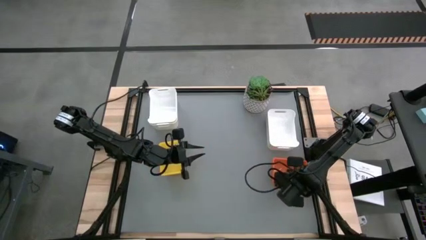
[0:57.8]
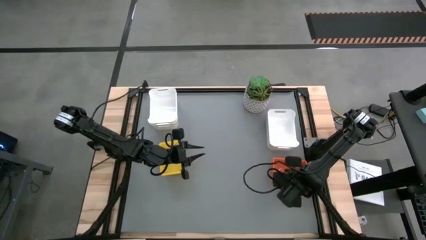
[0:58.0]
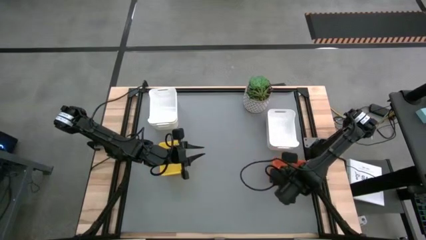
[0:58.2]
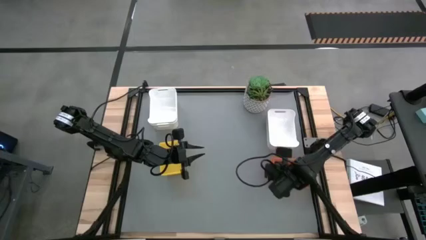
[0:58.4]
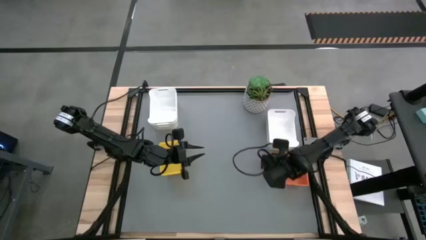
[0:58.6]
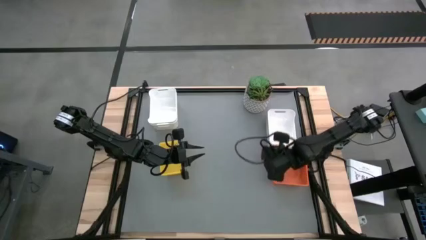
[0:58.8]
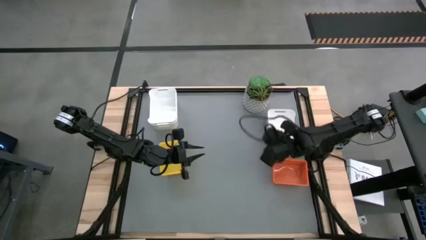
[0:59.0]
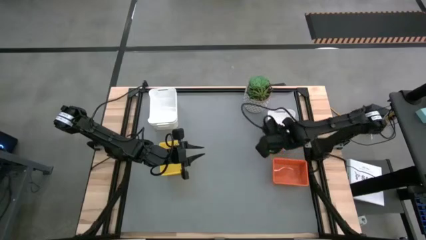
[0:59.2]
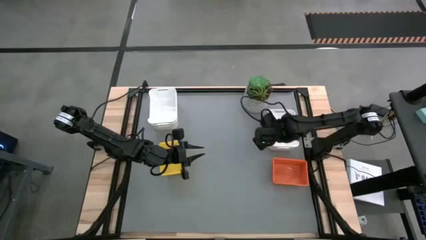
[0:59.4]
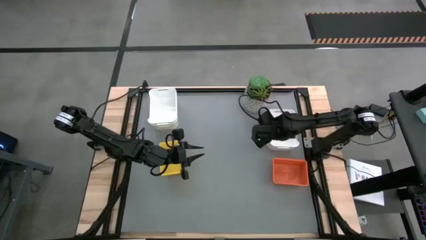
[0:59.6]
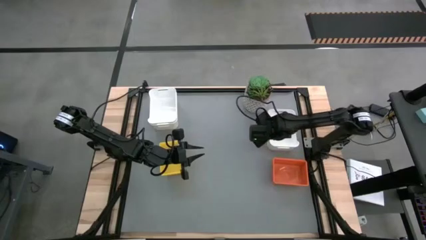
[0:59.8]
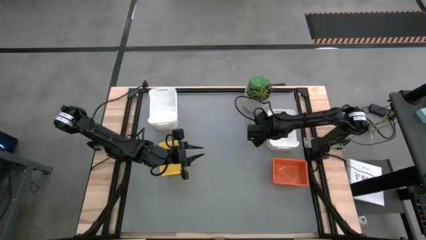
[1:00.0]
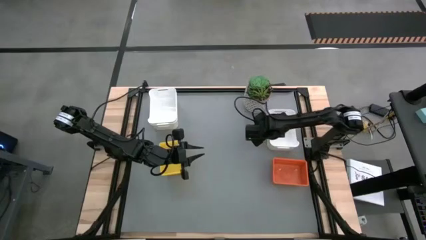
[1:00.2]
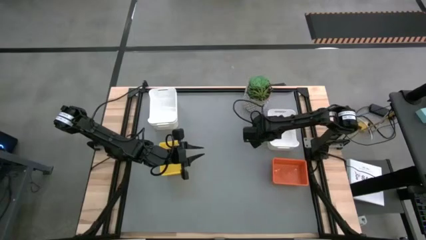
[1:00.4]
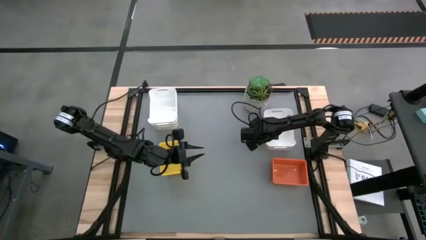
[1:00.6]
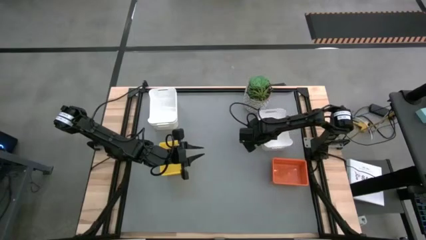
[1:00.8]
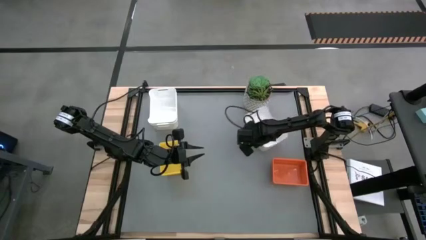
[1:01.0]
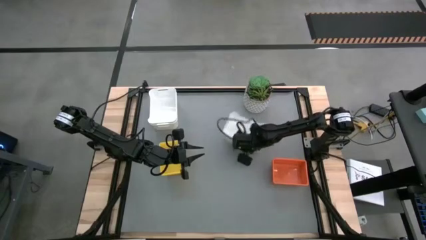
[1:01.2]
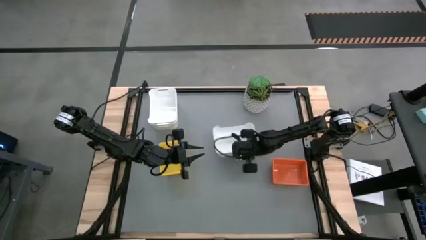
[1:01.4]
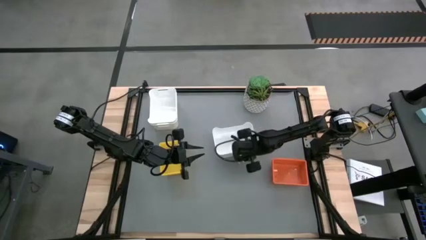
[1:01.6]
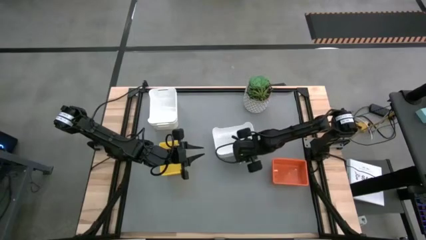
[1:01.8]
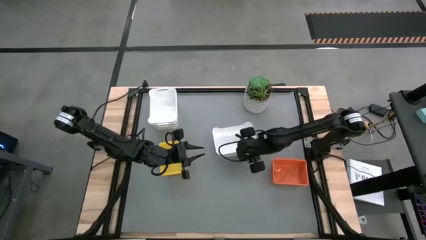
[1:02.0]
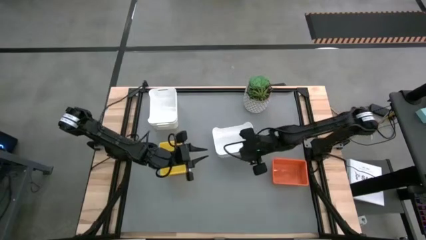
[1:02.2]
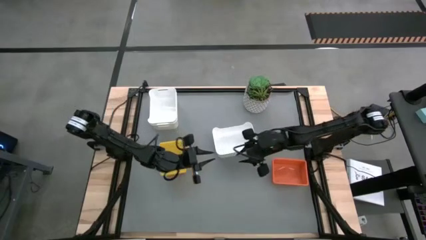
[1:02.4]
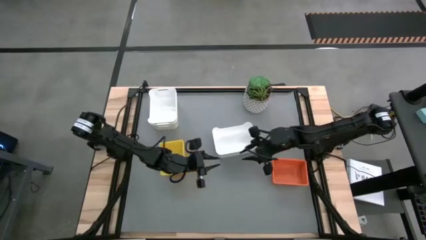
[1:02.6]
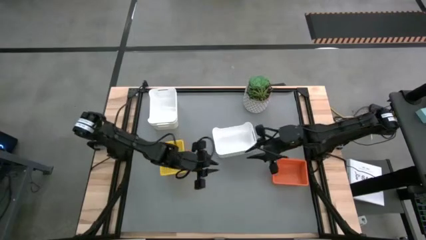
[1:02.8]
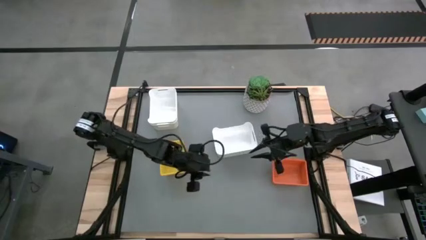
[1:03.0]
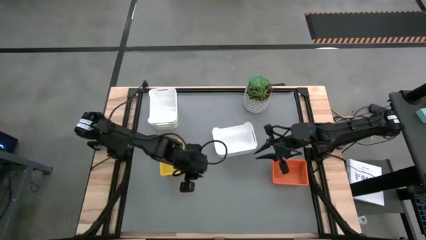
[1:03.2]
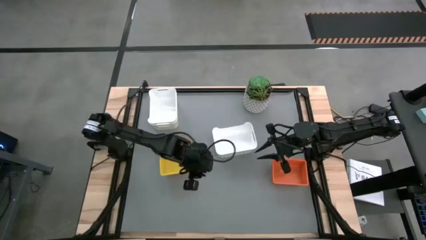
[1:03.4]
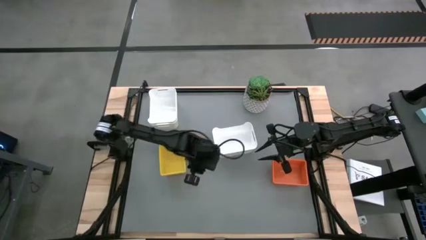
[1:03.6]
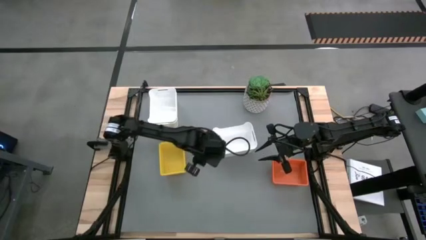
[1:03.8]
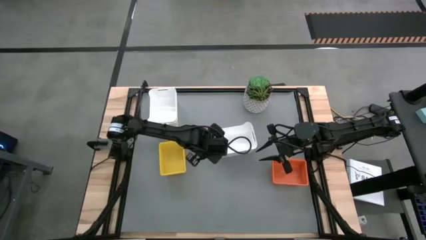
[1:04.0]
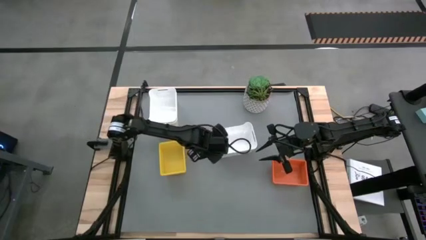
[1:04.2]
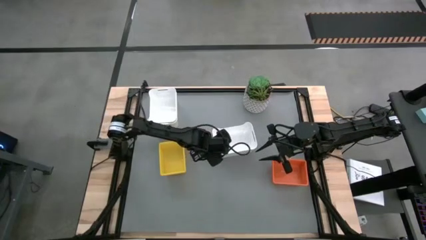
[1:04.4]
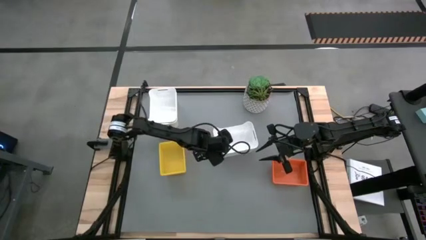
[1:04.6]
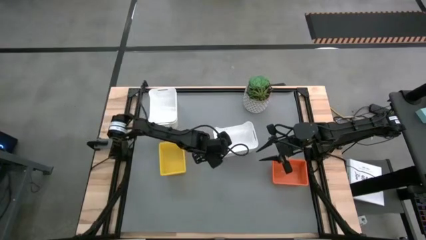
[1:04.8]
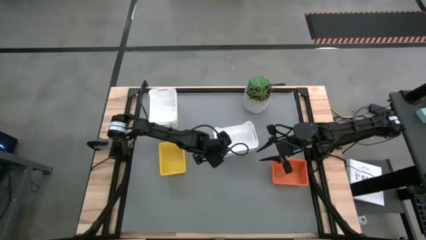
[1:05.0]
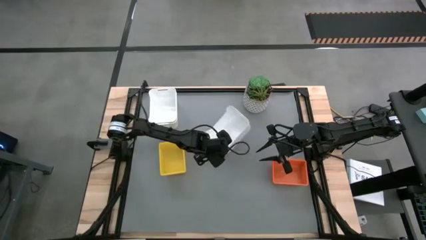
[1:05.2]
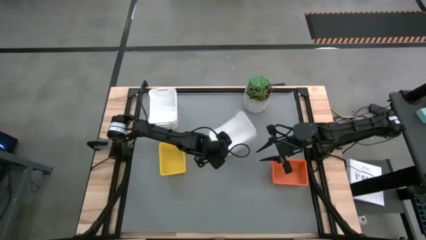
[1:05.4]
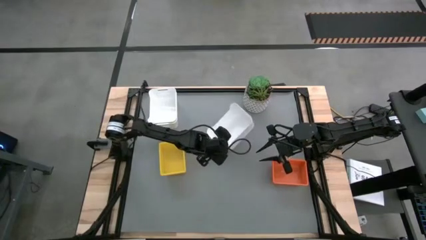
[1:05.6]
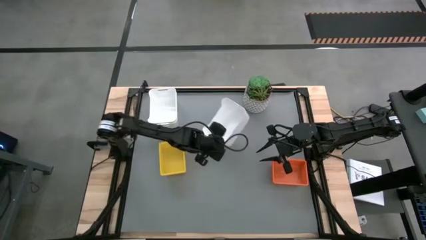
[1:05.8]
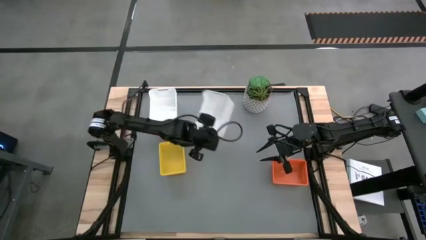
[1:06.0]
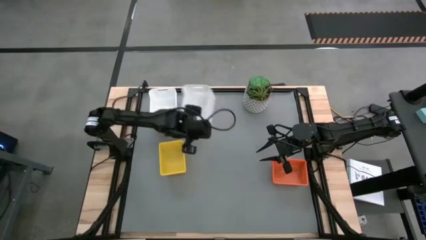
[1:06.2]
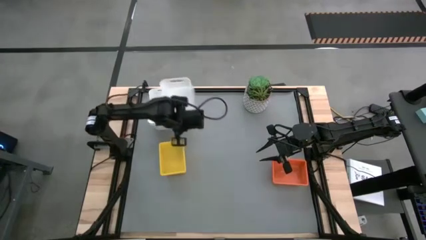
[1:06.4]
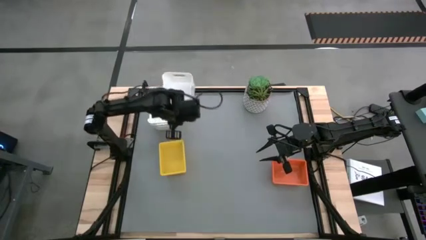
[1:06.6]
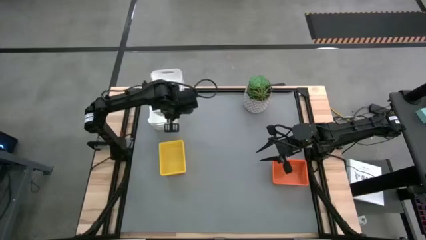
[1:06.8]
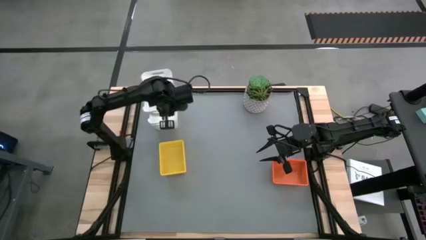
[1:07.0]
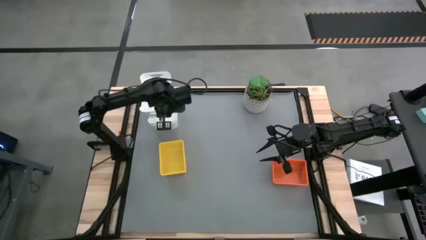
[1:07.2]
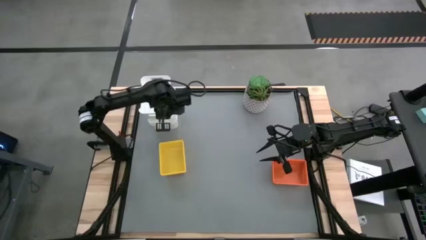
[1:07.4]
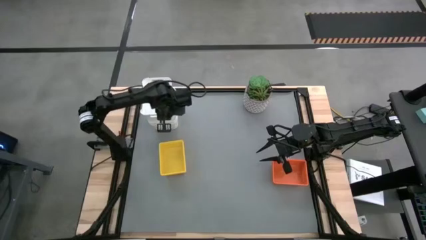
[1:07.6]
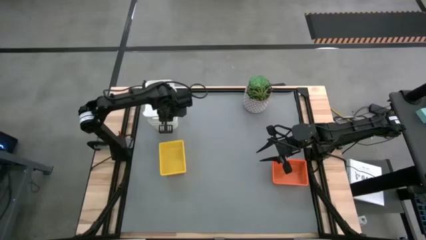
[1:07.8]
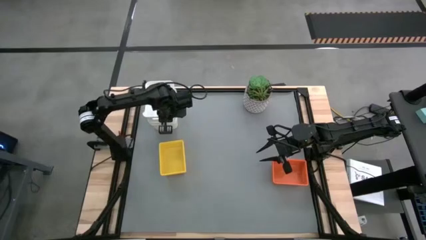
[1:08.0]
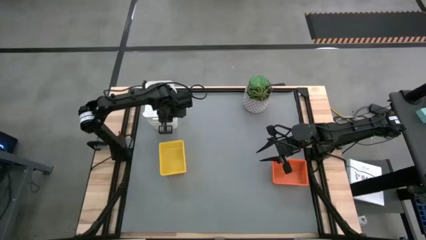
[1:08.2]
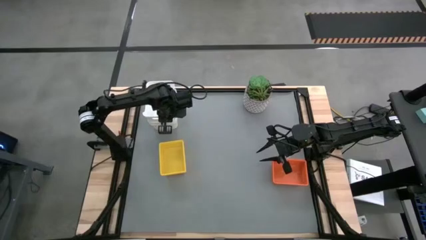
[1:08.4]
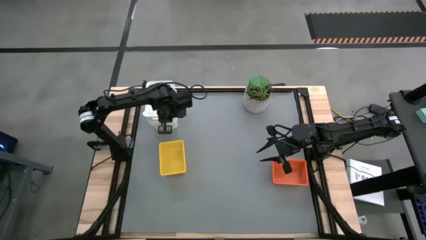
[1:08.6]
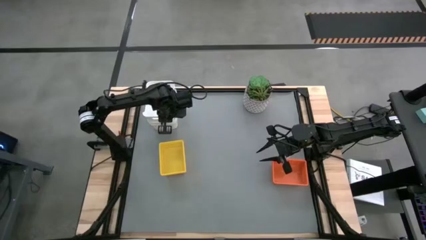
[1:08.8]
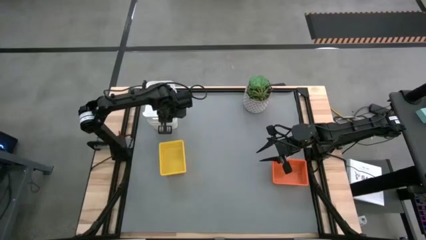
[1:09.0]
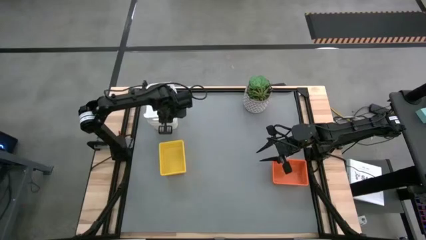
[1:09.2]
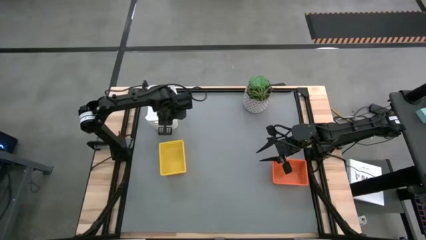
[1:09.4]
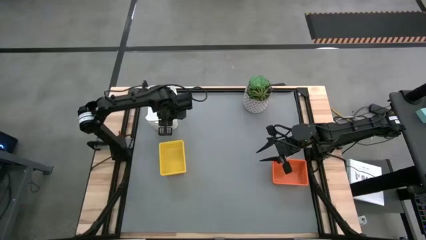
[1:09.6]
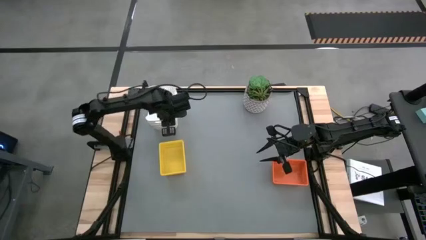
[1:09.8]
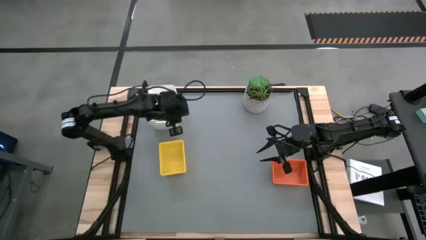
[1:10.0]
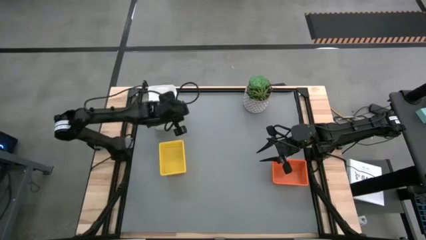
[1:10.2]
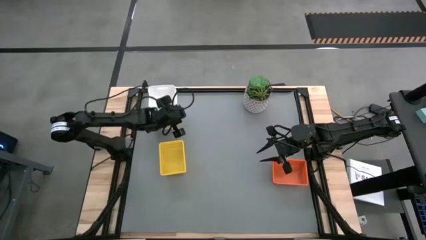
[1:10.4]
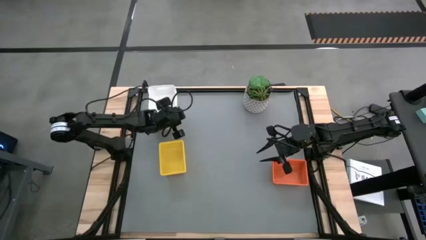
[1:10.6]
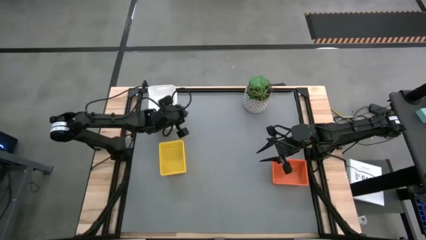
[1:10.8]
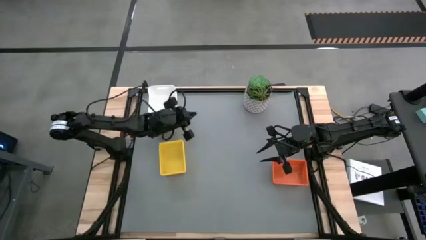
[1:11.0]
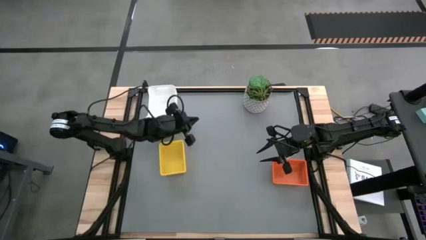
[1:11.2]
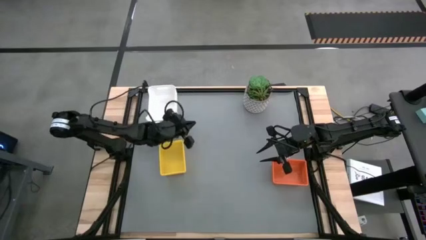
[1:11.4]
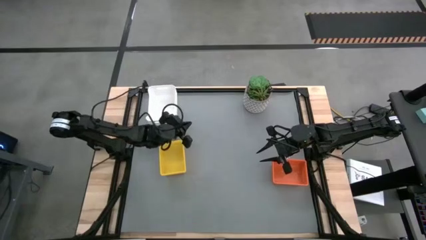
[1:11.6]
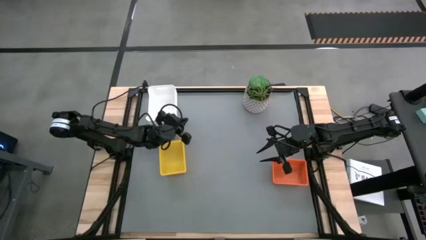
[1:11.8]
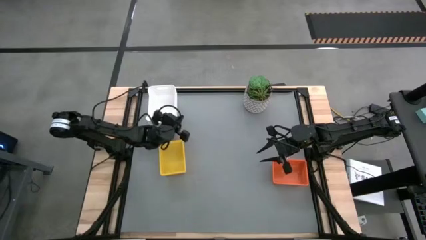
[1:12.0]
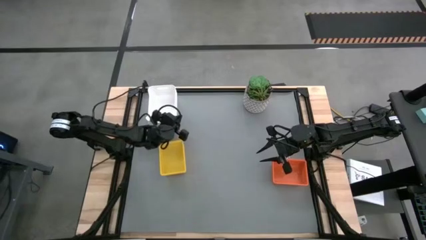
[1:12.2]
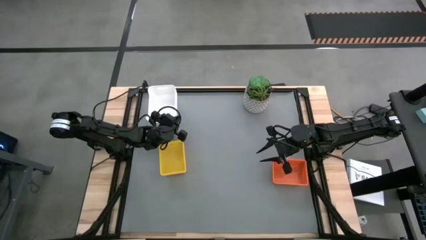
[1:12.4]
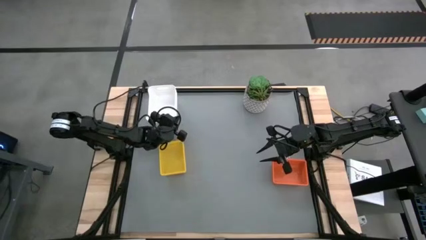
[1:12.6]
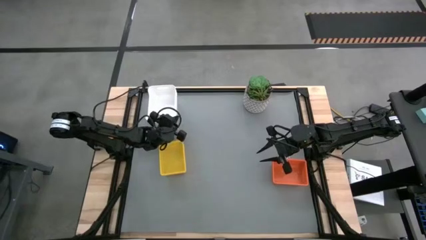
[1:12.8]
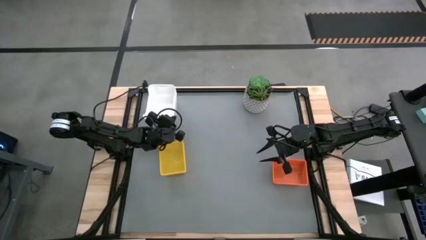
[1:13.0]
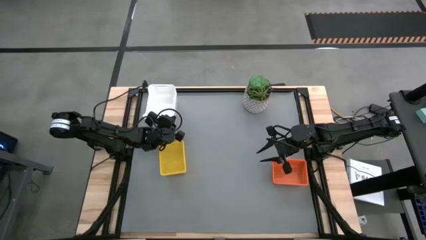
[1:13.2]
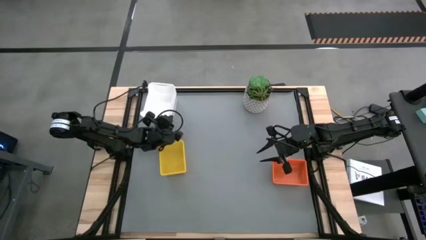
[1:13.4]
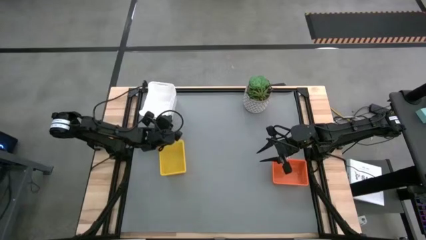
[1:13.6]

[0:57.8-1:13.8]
Stack the right white bin on top of the left white bin
